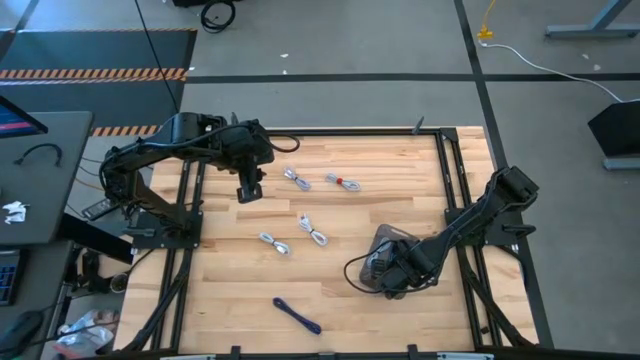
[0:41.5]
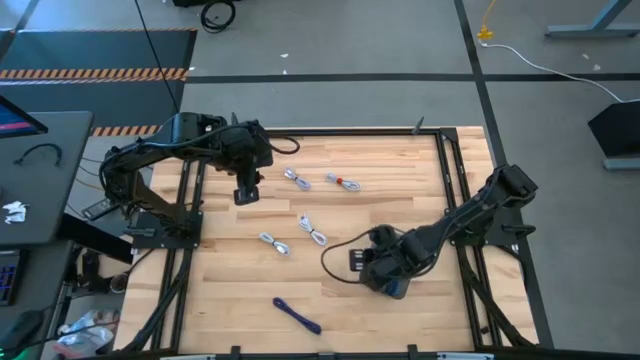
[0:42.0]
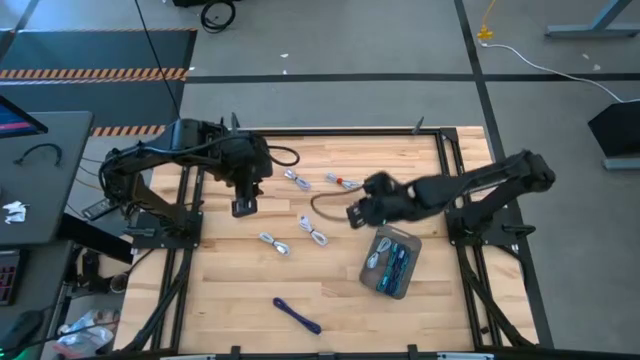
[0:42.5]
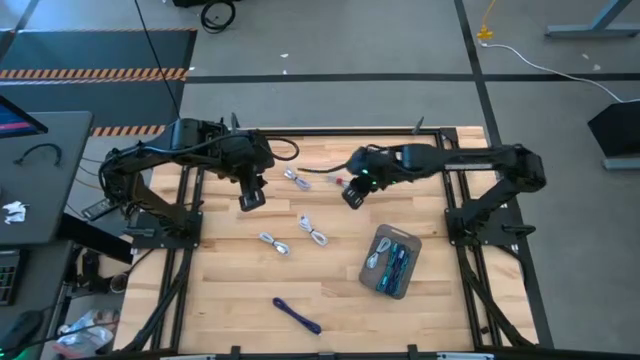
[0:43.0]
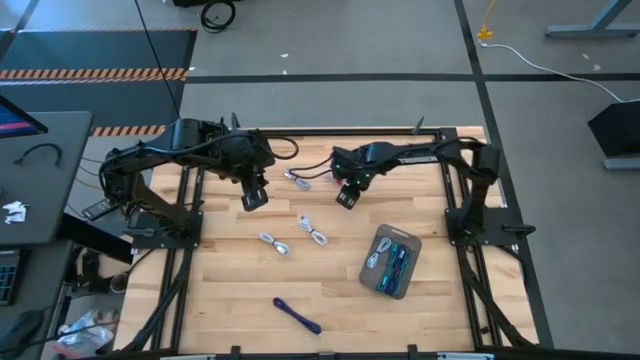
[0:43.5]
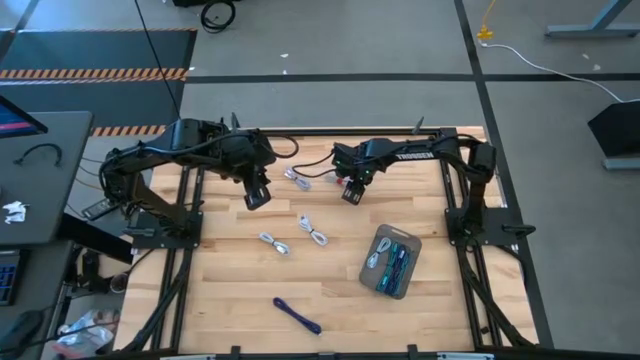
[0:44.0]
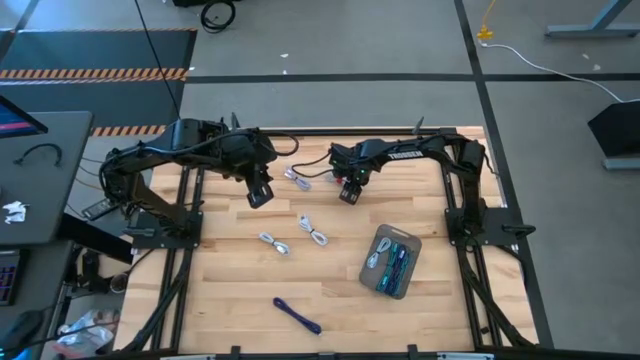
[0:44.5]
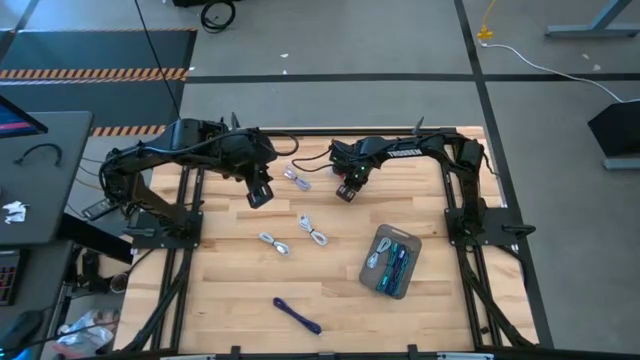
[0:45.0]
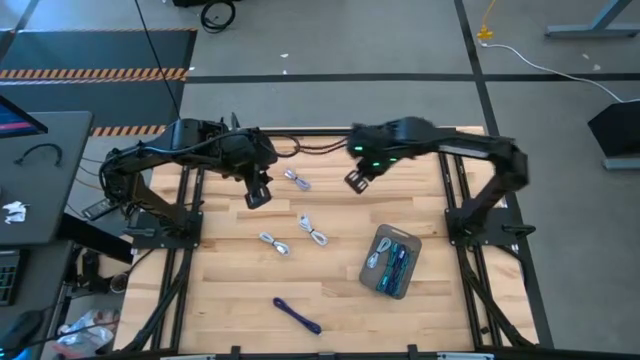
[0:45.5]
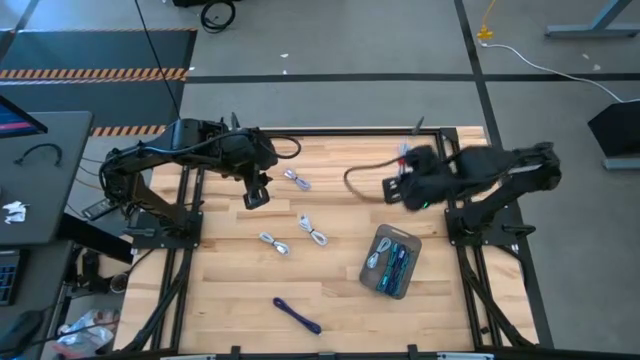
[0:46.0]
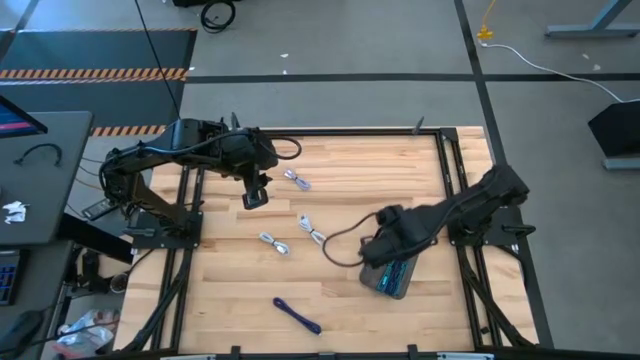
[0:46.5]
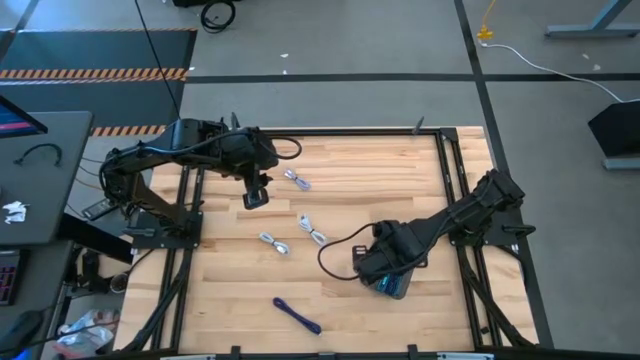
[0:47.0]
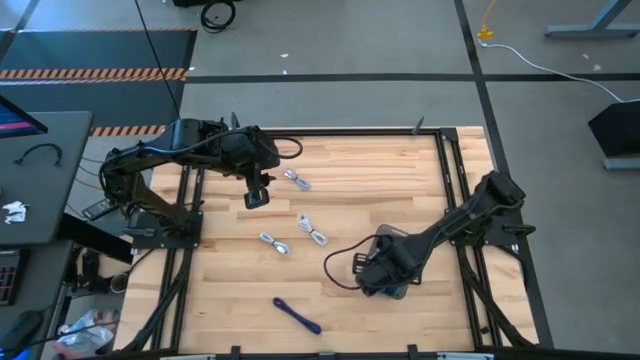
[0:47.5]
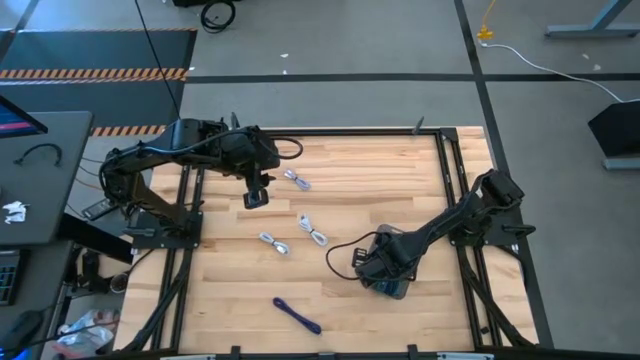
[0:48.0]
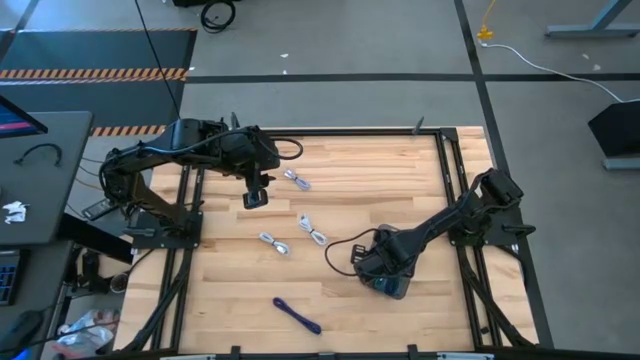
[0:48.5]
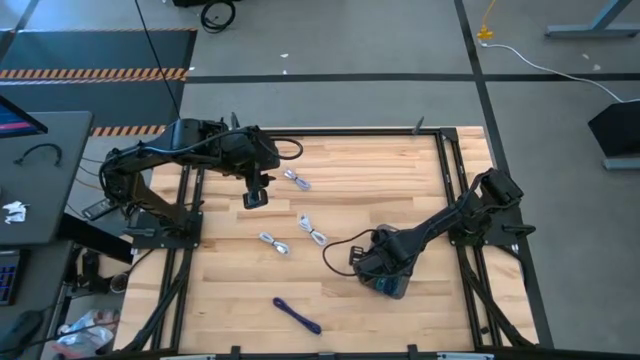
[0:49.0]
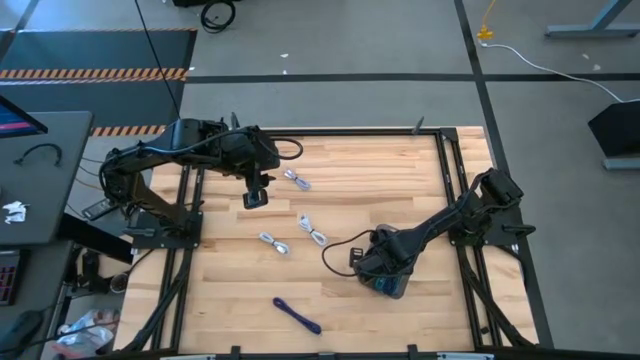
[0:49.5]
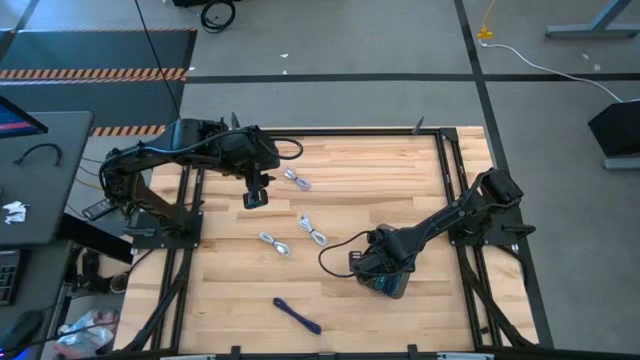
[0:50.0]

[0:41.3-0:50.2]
Task: Pick and place USB-C Cables
Put the top right white charger cable into the gray bin

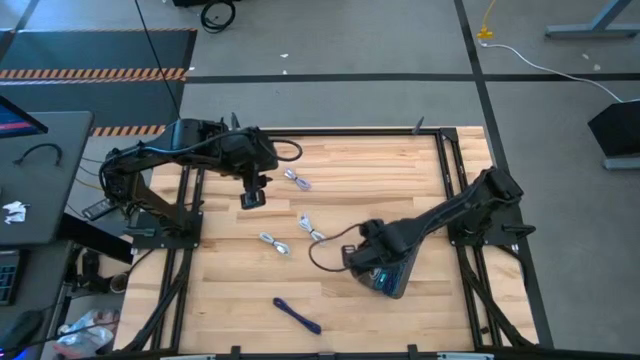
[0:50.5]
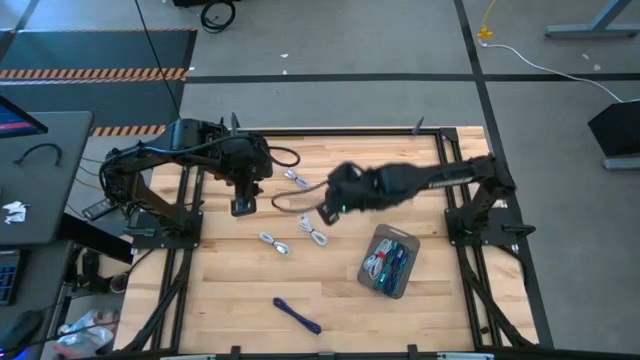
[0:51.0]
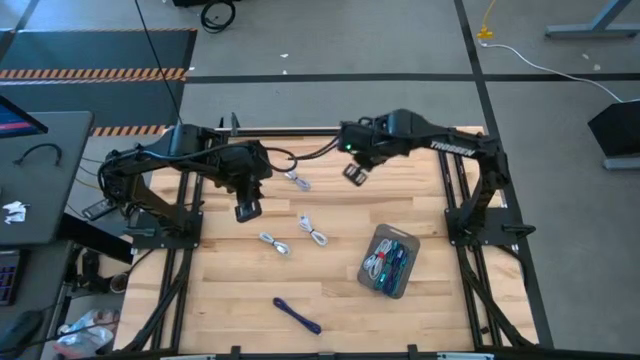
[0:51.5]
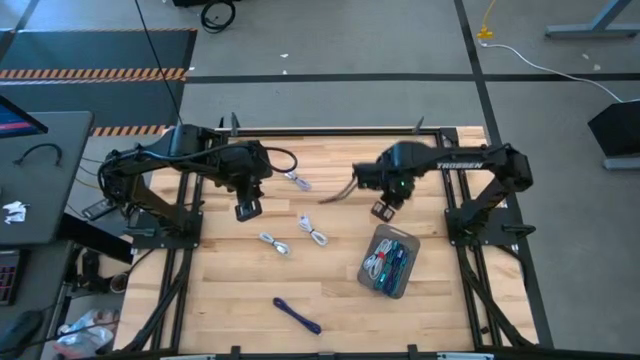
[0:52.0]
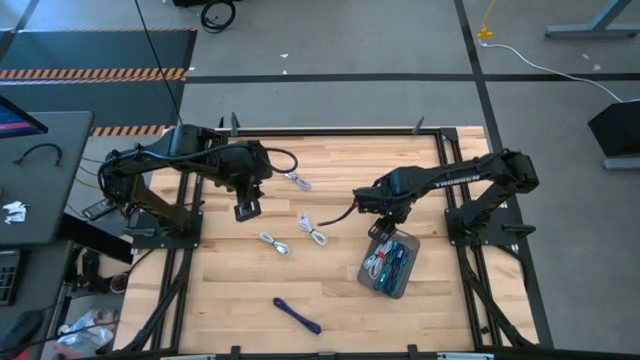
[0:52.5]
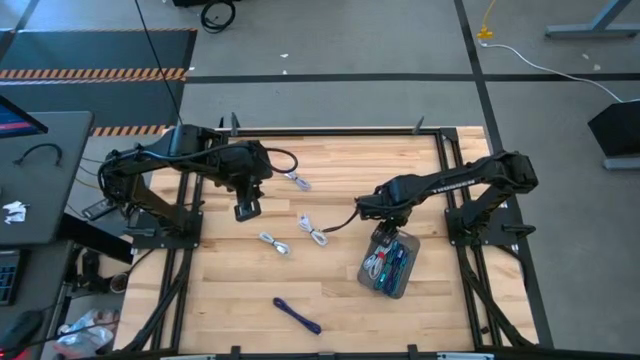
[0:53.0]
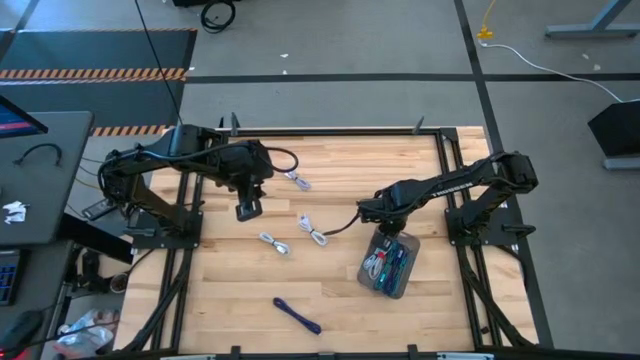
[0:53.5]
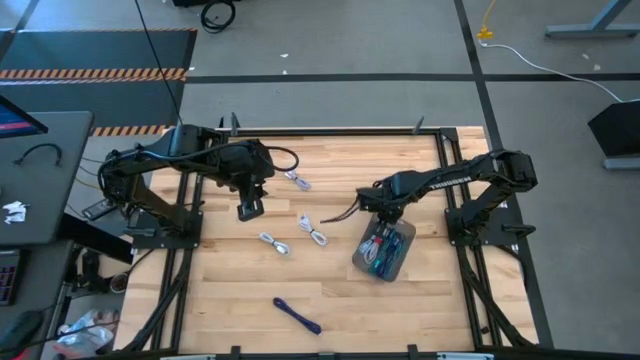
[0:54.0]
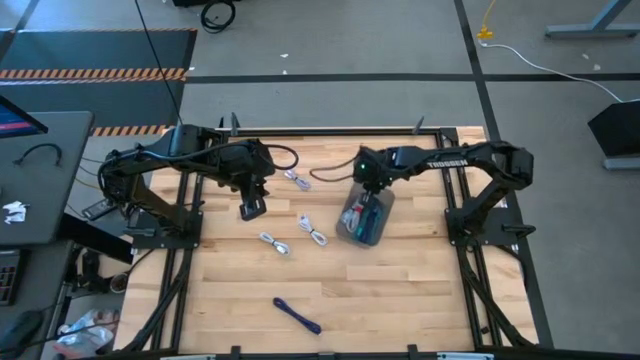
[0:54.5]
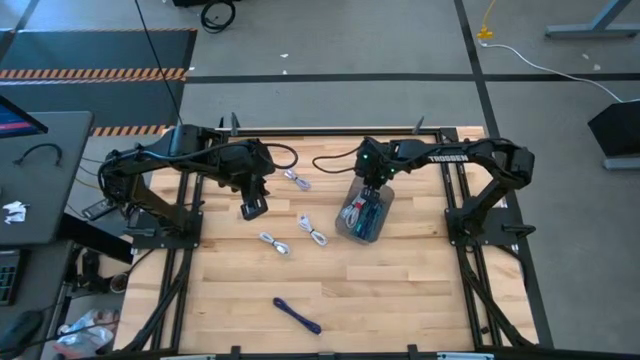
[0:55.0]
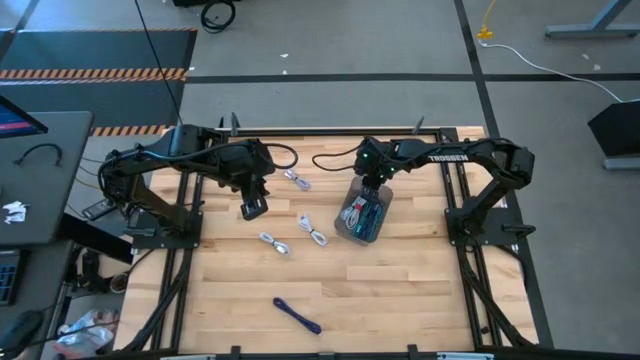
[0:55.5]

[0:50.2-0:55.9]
Move the gray bin to the top right of the table

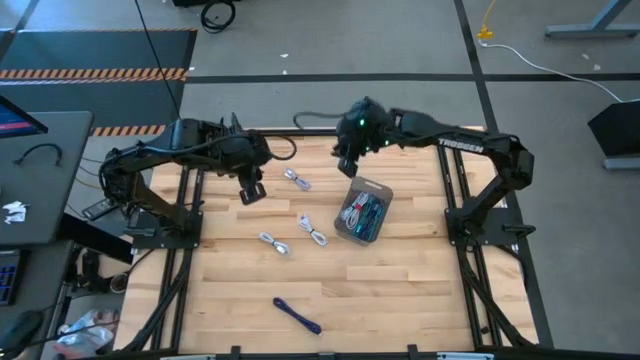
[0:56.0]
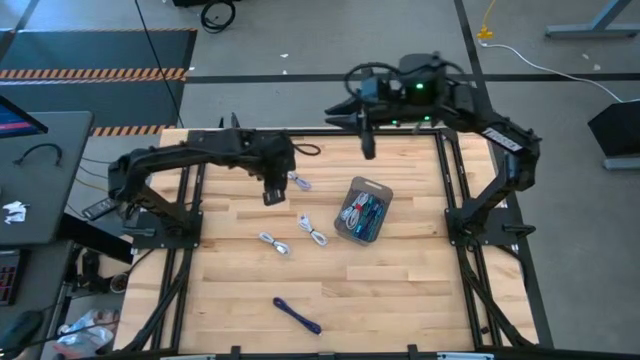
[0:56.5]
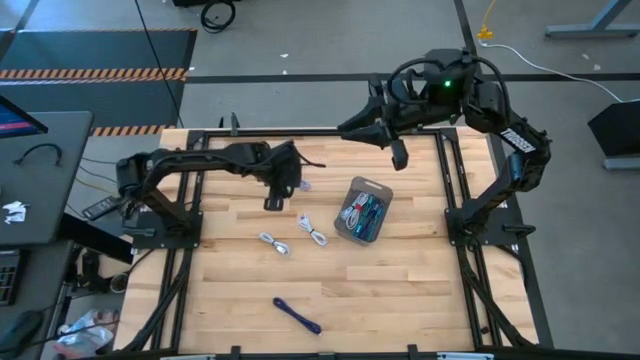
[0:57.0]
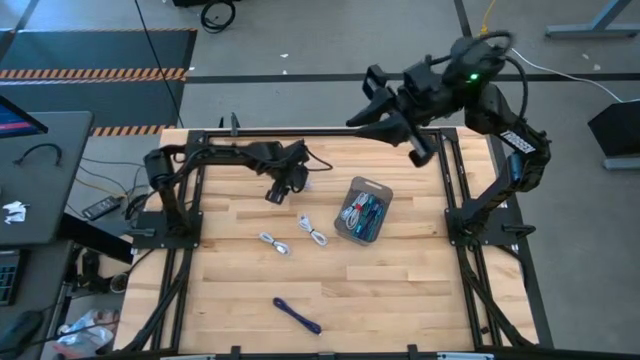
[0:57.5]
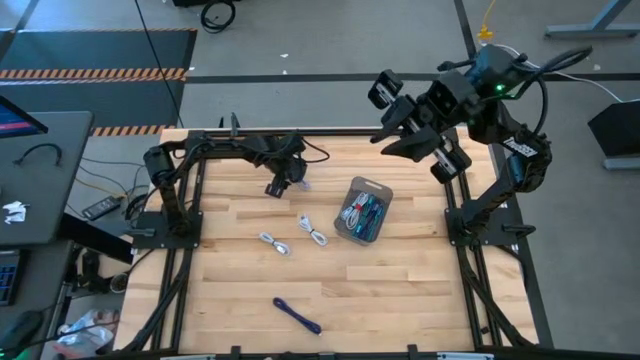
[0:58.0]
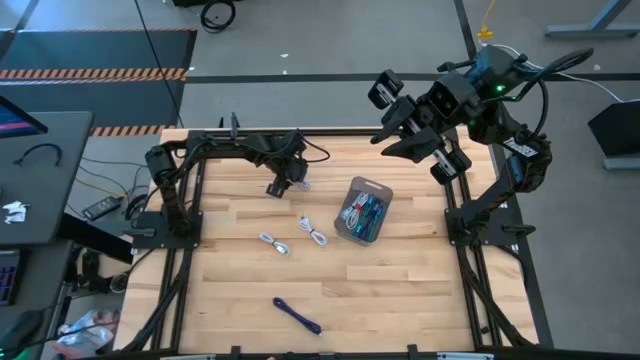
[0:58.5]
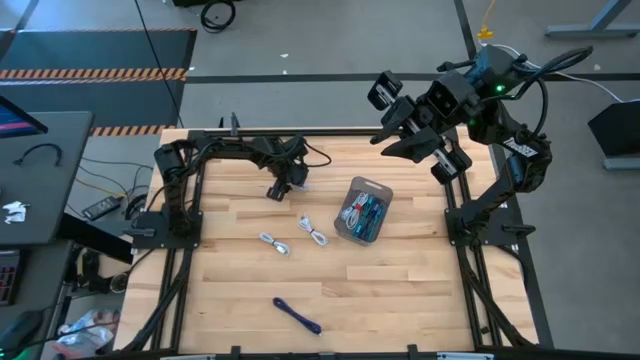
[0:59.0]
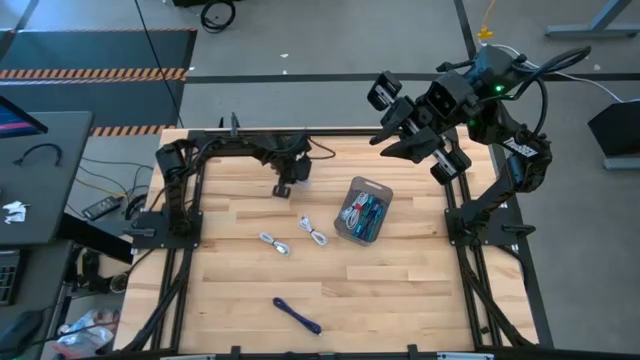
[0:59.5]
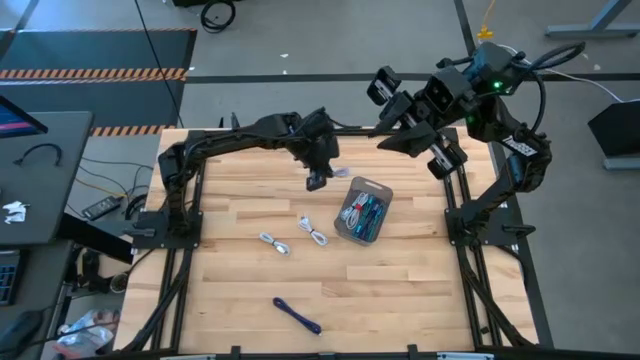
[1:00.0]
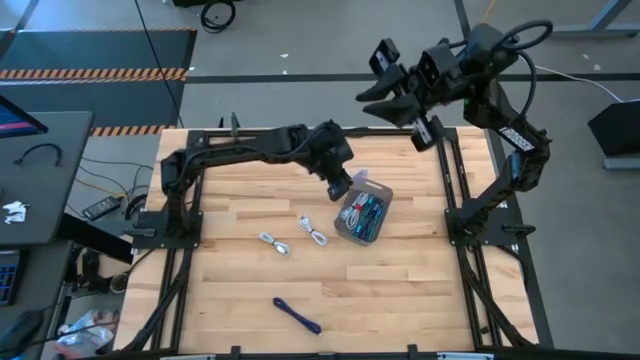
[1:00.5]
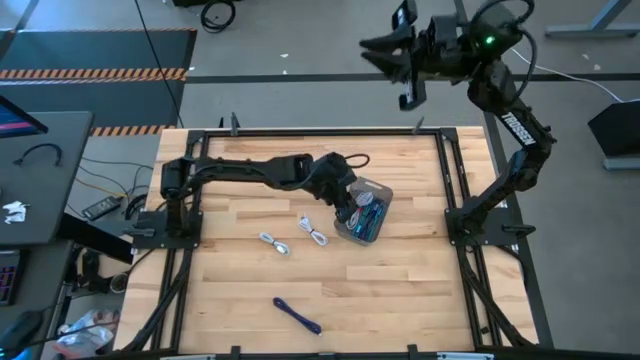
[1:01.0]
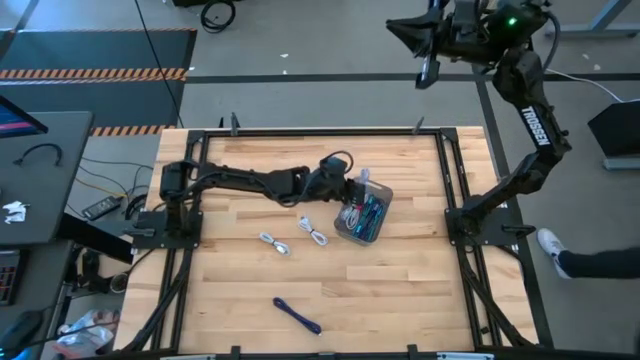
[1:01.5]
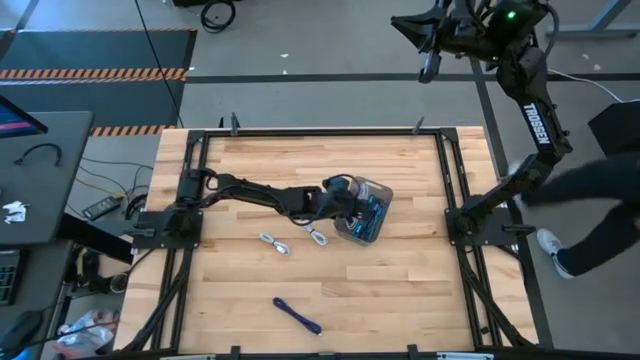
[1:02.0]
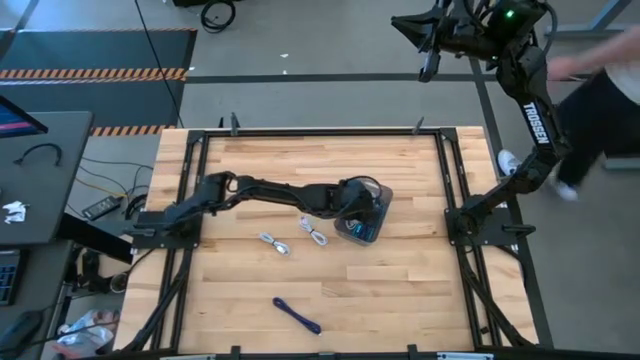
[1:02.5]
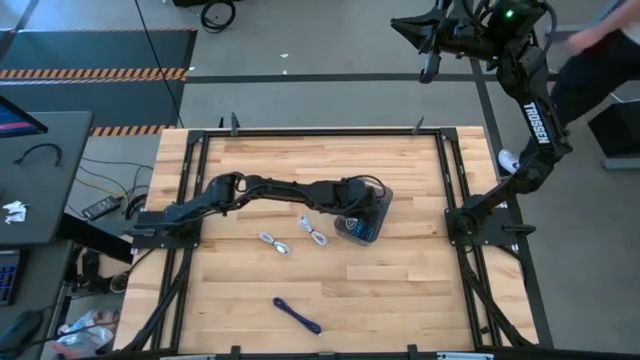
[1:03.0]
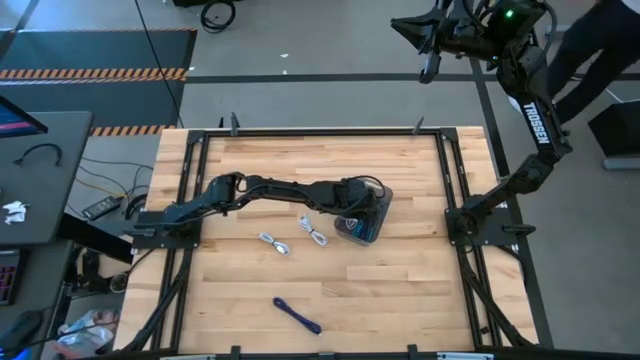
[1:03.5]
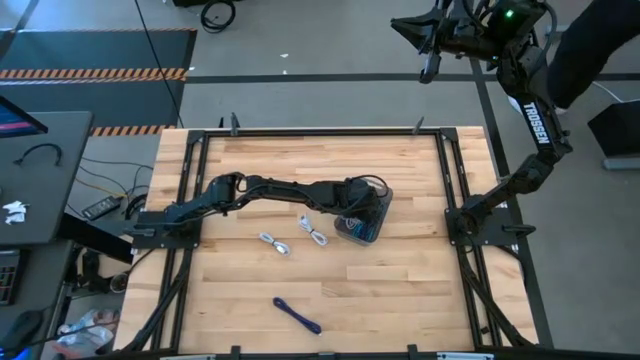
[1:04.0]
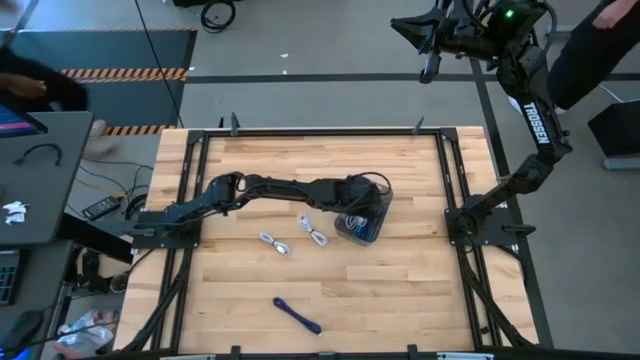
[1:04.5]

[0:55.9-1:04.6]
Put the top left light blue charger cable into the gray bin
